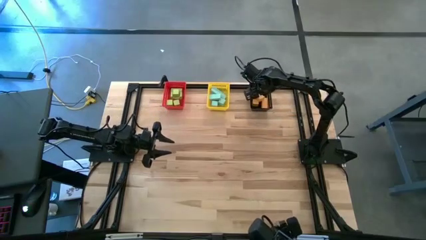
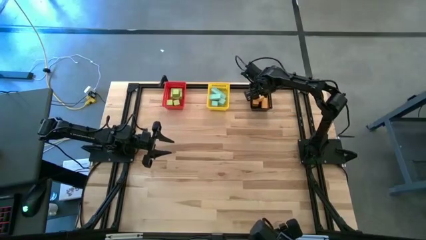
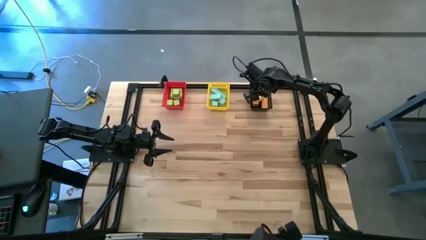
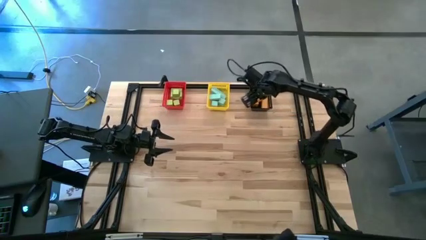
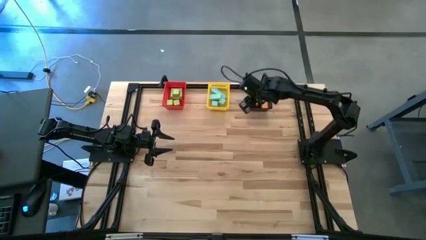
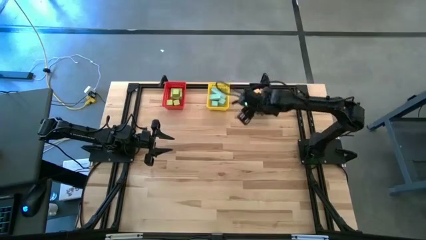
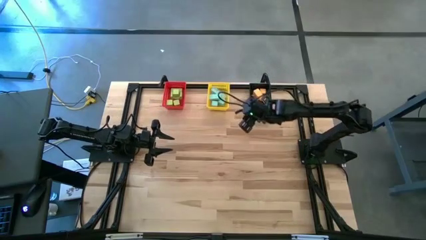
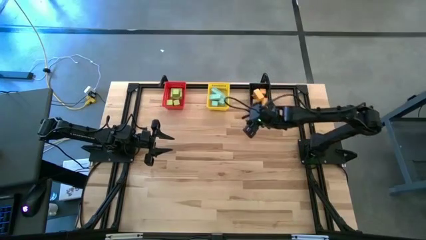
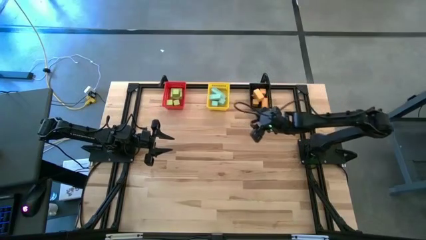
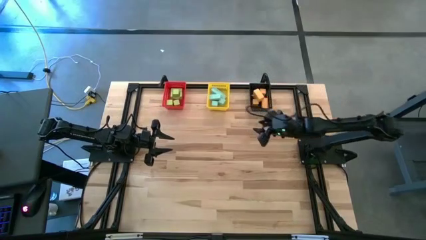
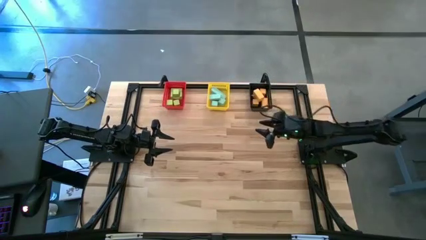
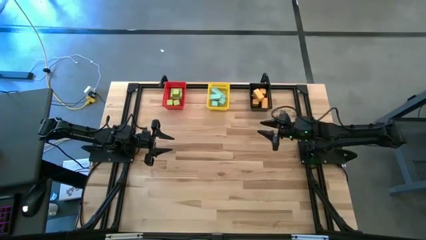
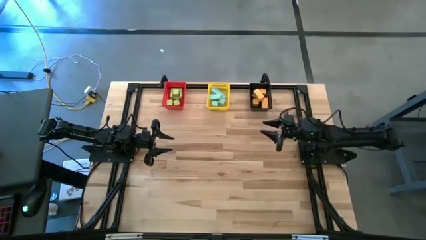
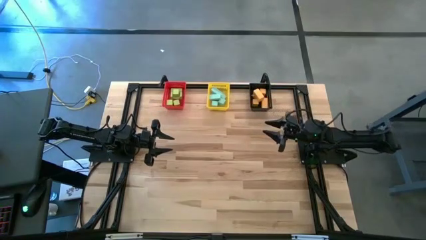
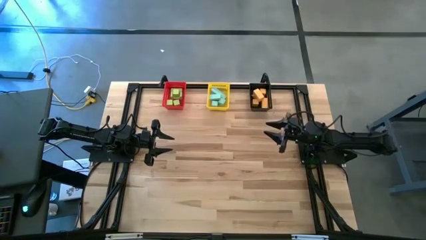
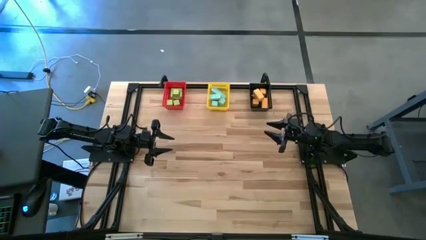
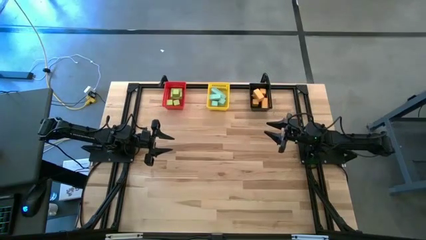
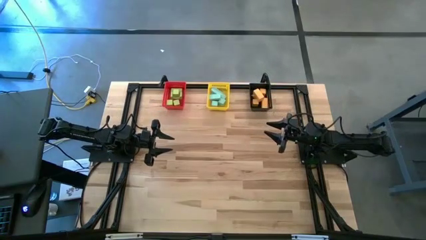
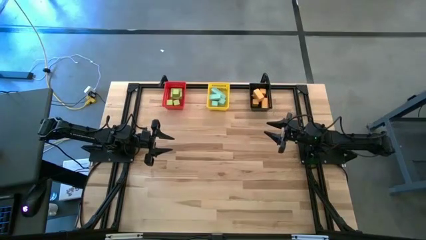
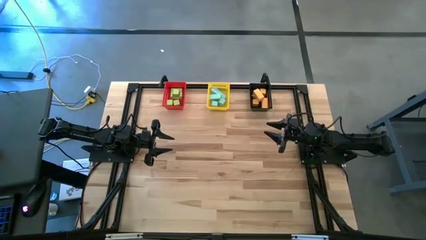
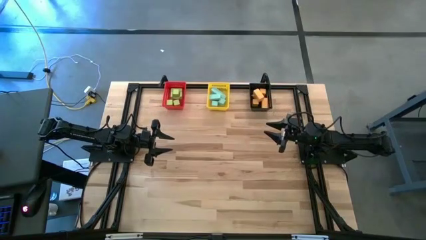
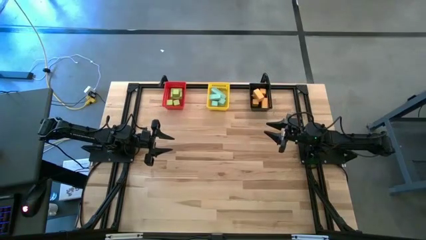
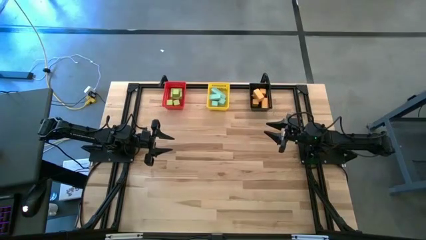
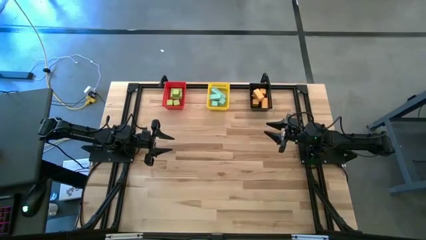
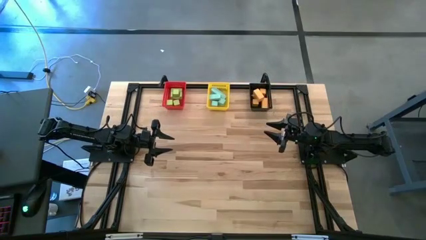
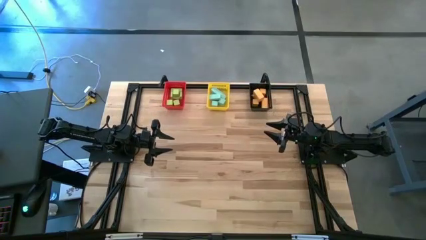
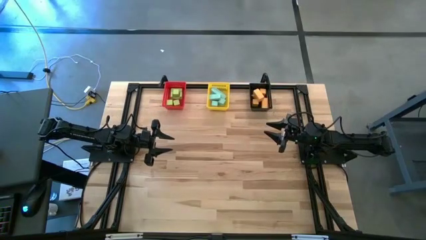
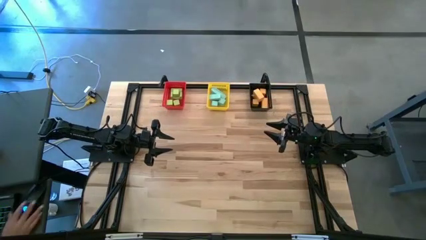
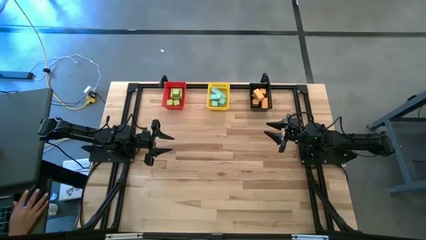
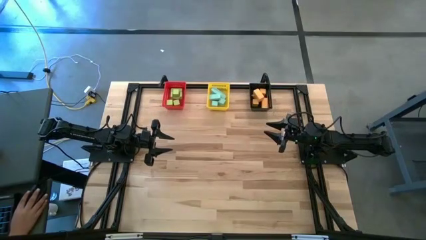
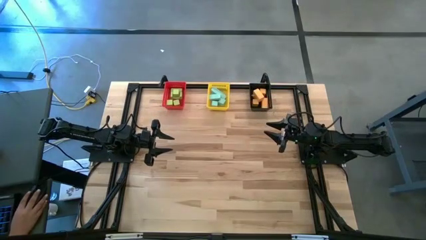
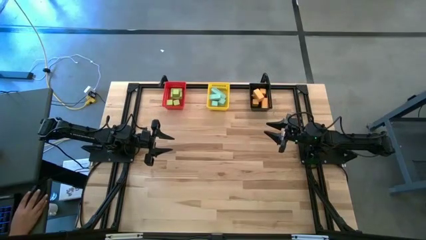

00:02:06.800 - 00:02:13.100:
Task: Sort & place blocks by color
Return to Home Position

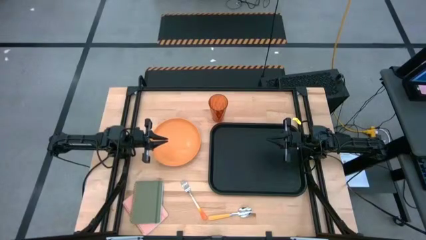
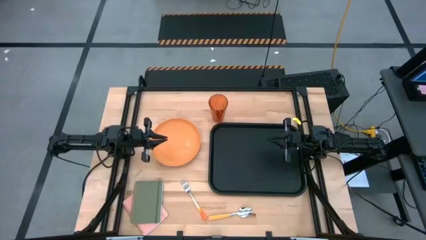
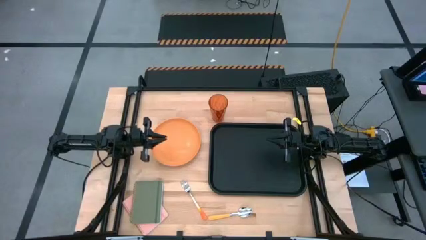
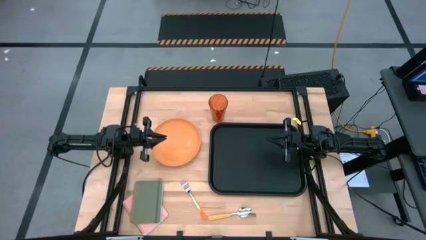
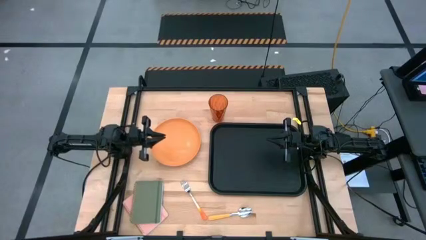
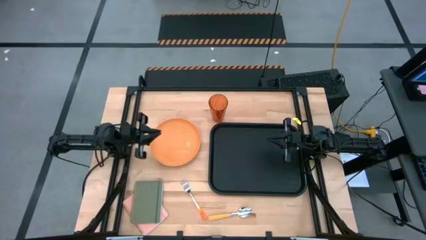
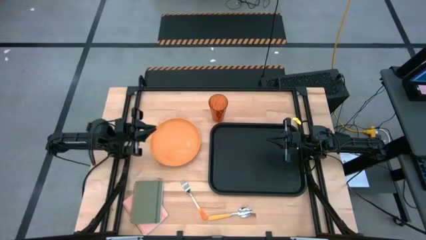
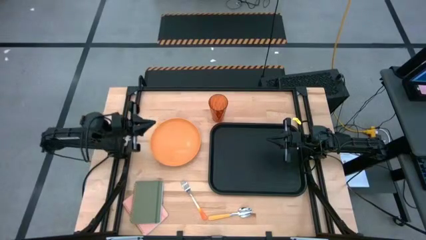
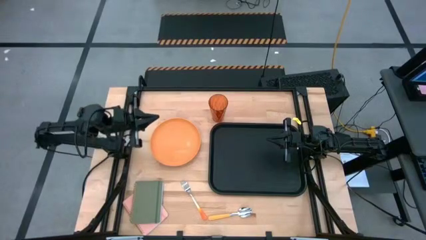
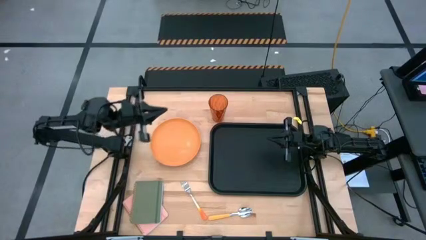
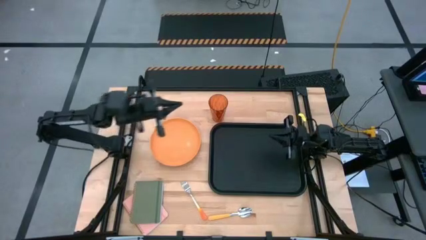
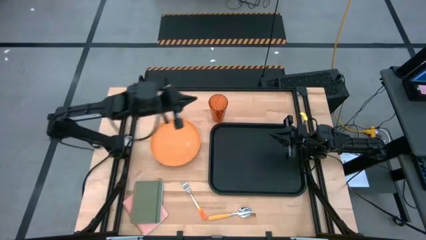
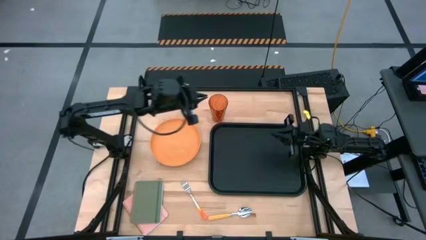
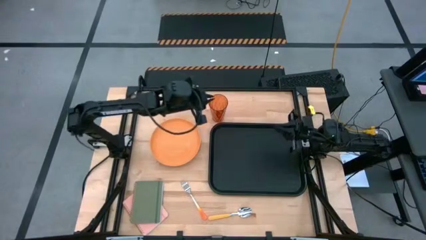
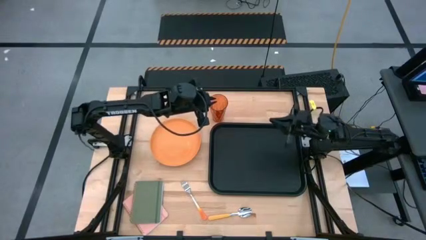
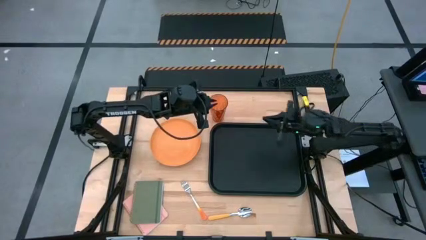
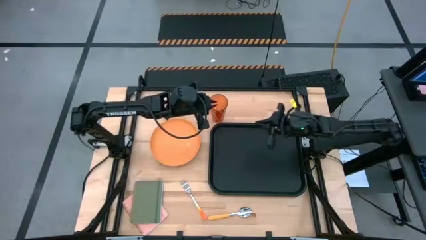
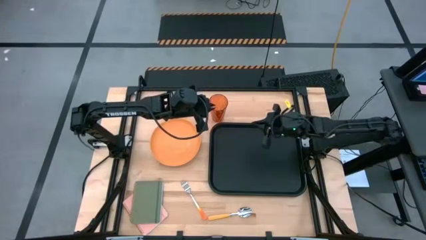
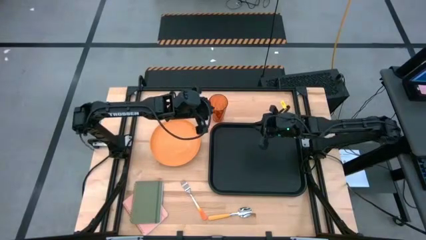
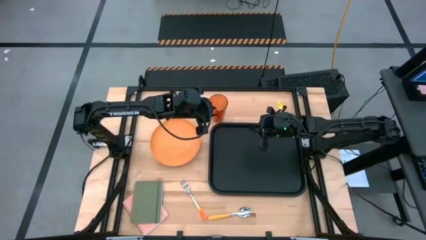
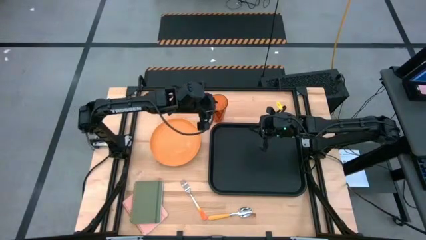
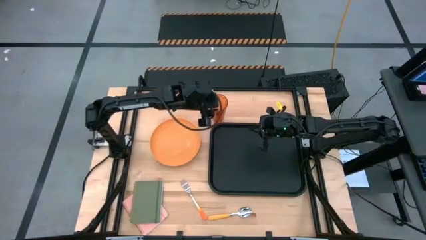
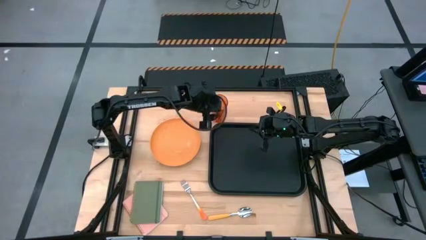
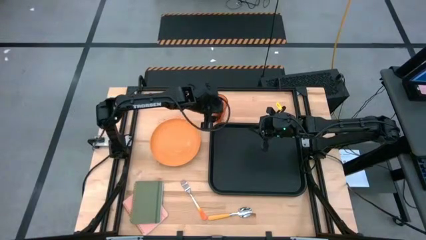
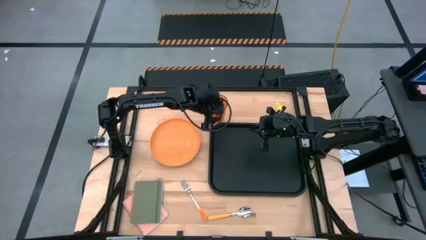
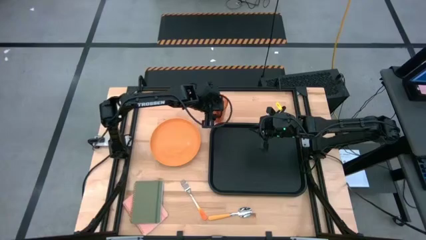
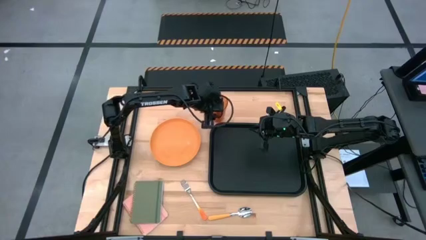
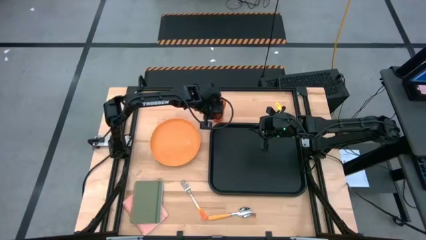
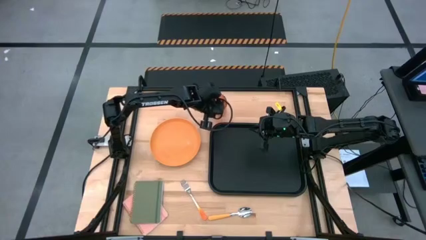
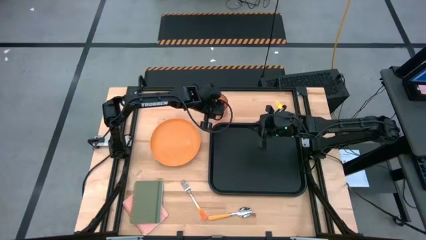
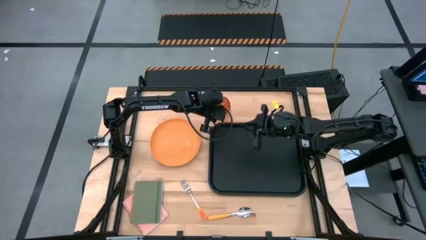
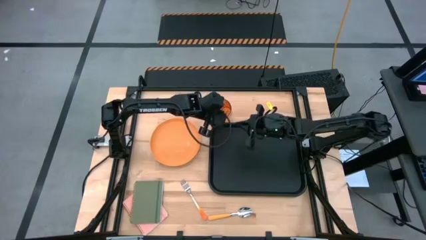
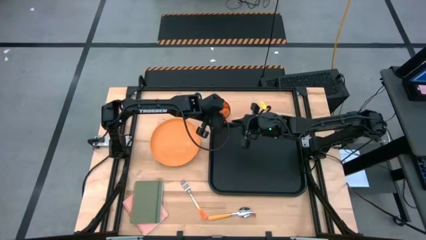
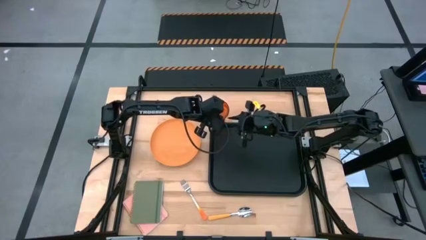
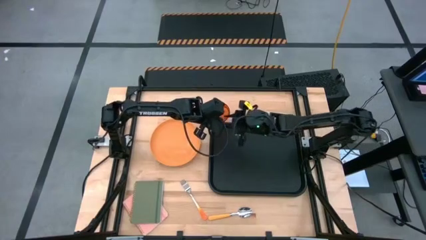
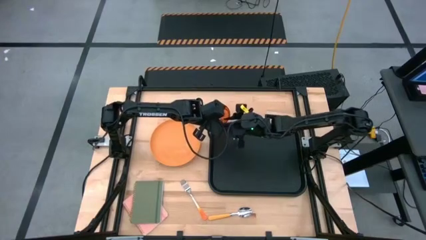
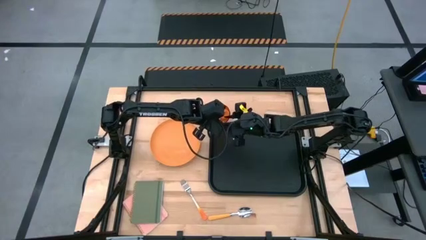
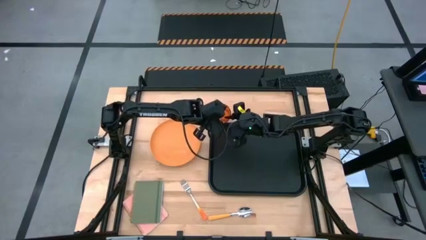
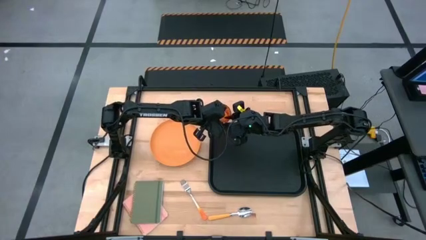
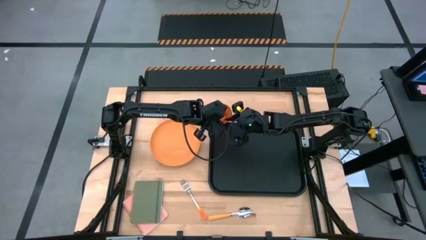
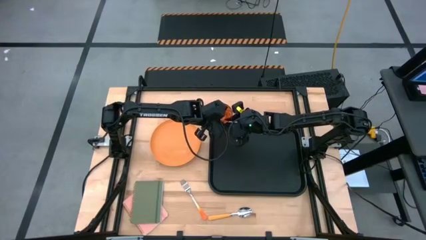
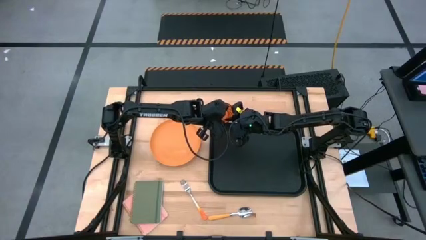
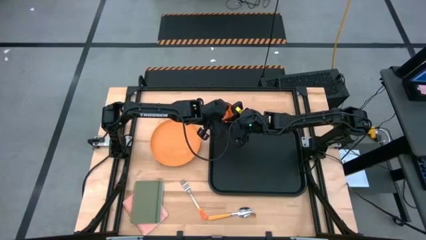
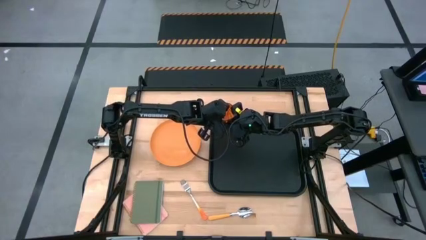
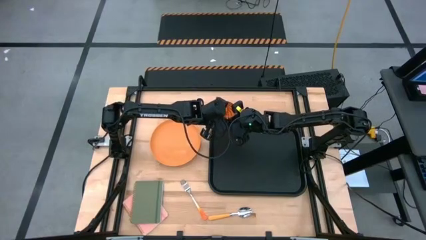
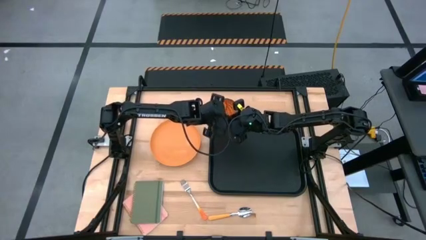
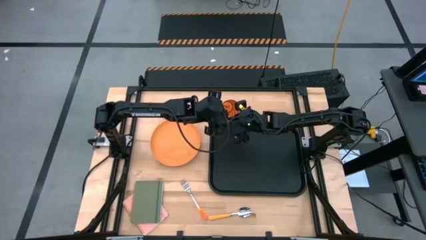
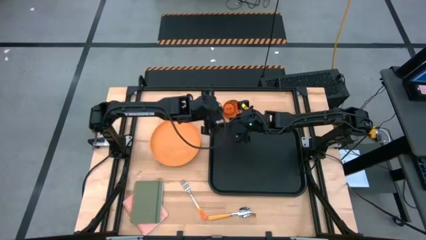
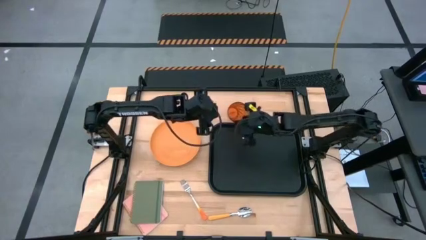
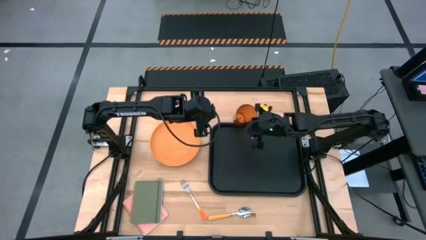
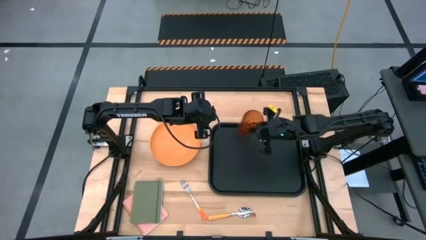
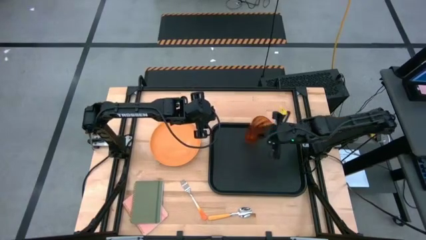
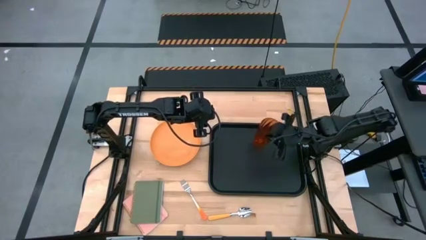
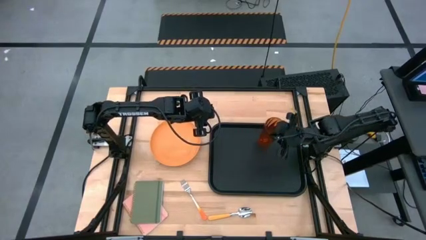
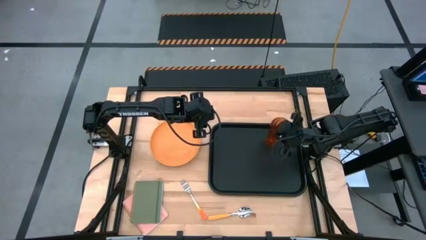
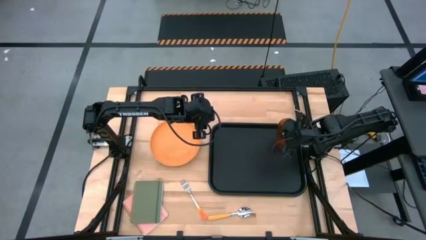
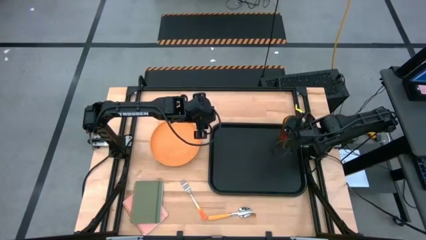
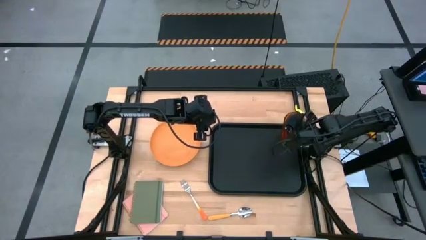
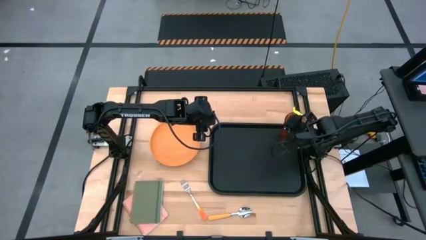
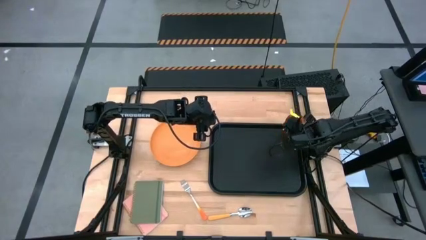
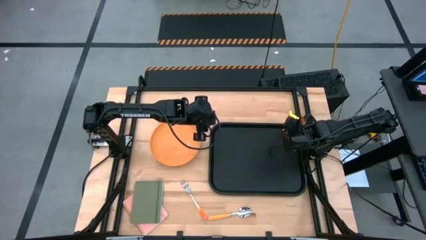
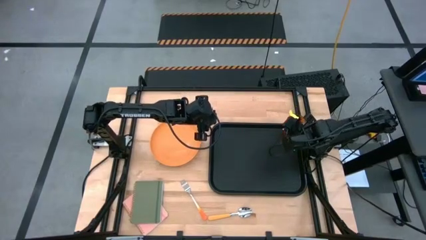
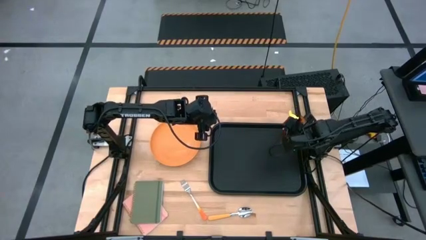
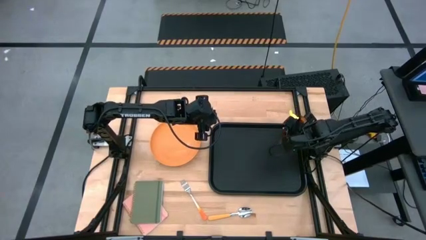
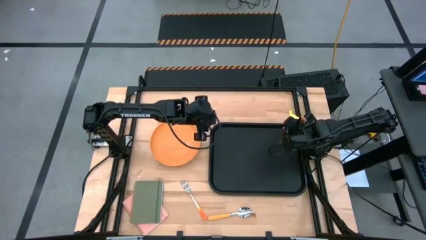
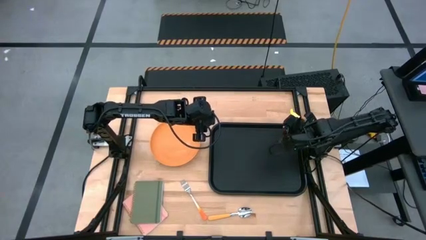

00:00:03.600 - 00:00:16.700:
Task: Pick and place plate/cup/fork/spoon on tray
Put the brown glass on the top left of the black serving tray
